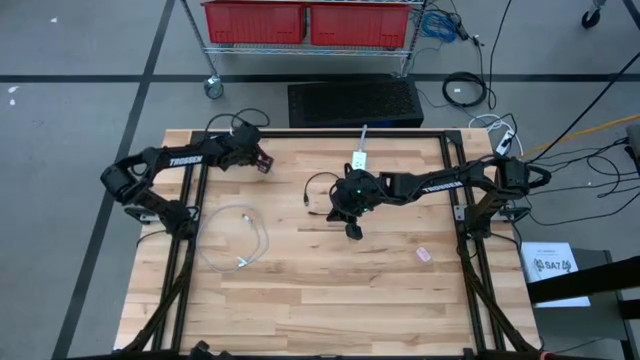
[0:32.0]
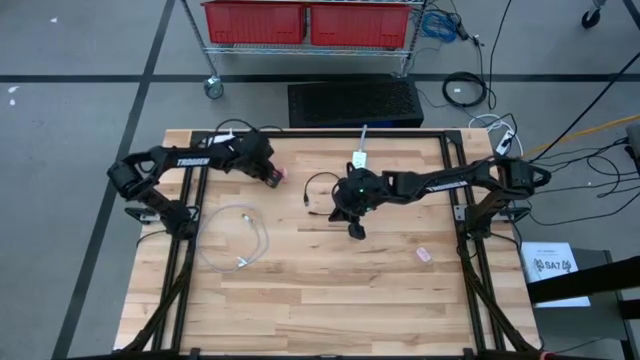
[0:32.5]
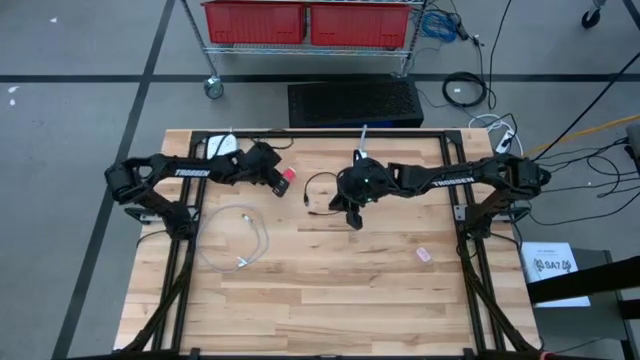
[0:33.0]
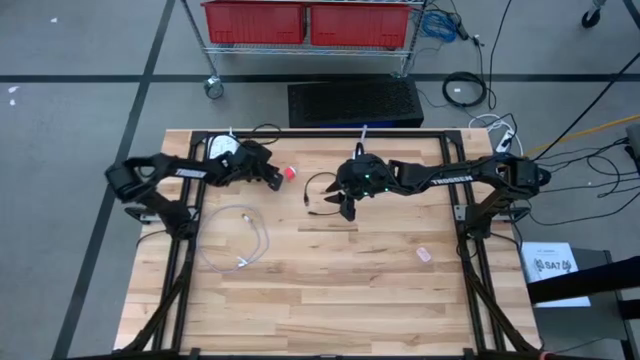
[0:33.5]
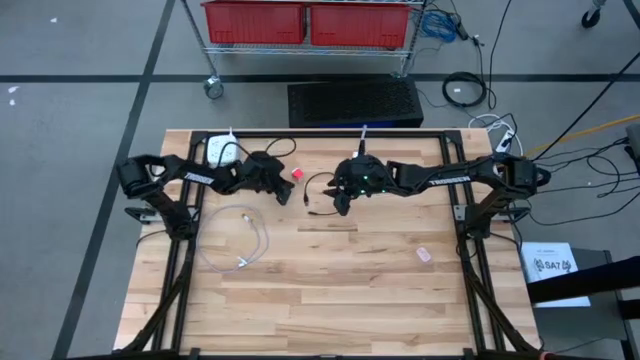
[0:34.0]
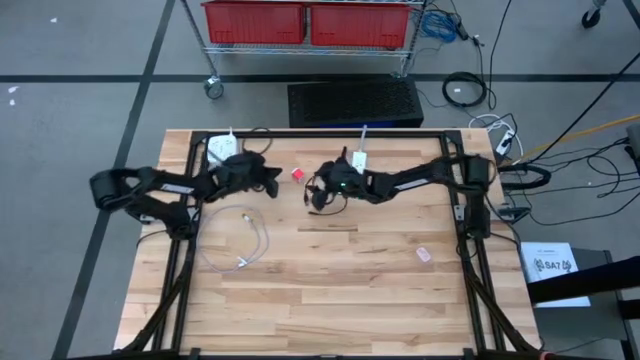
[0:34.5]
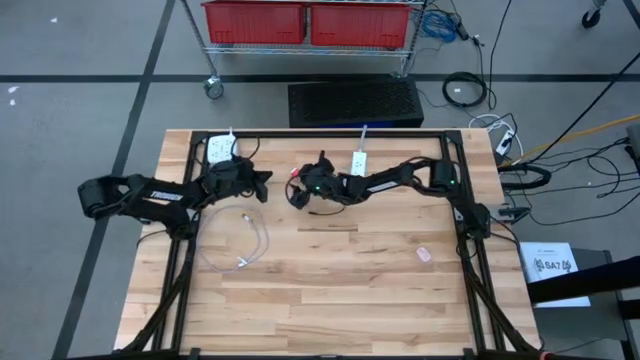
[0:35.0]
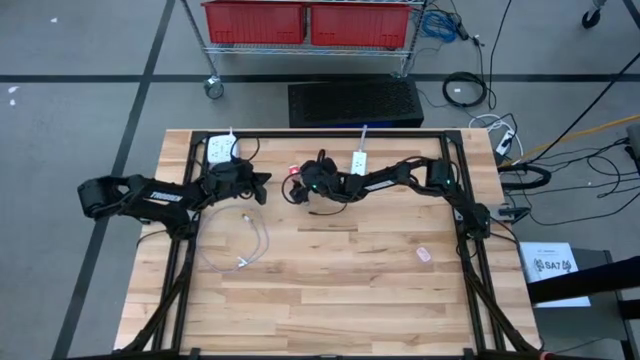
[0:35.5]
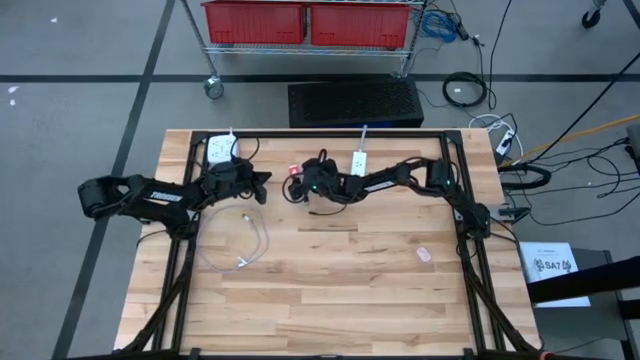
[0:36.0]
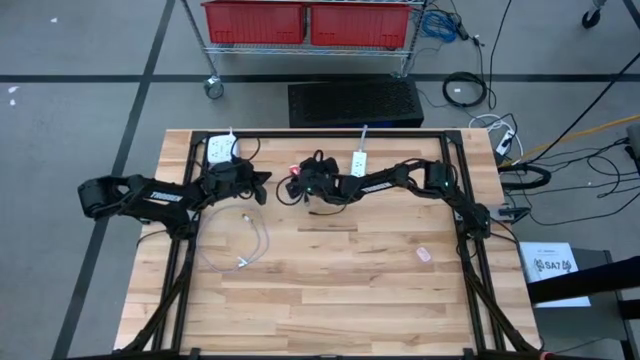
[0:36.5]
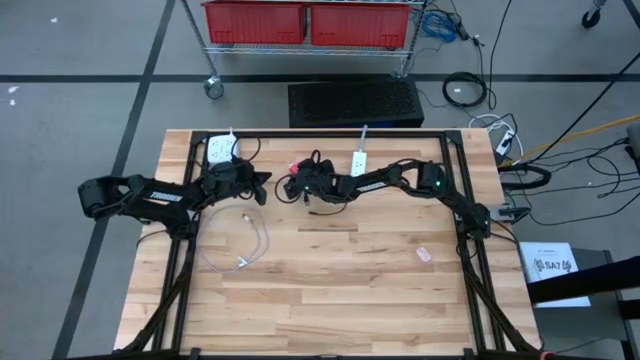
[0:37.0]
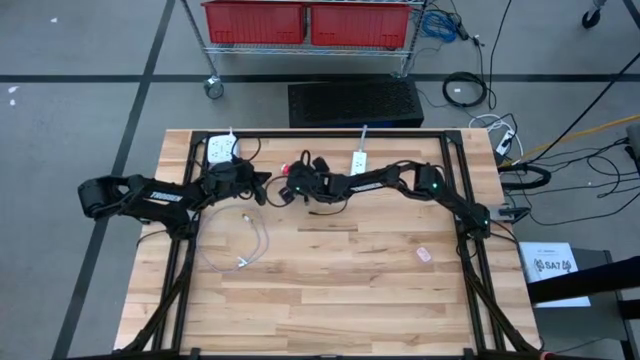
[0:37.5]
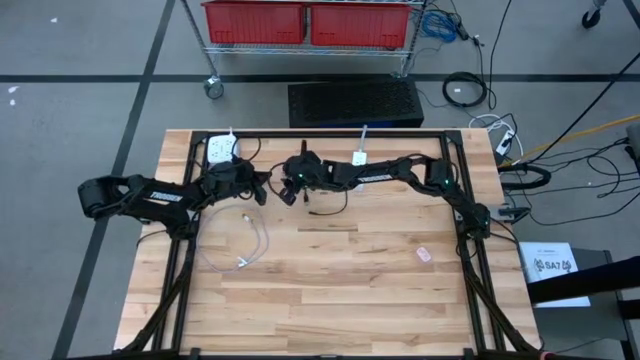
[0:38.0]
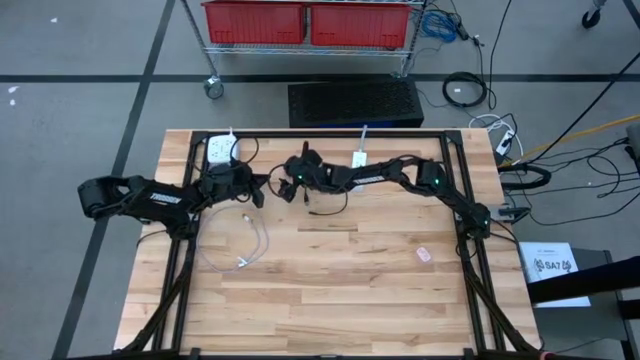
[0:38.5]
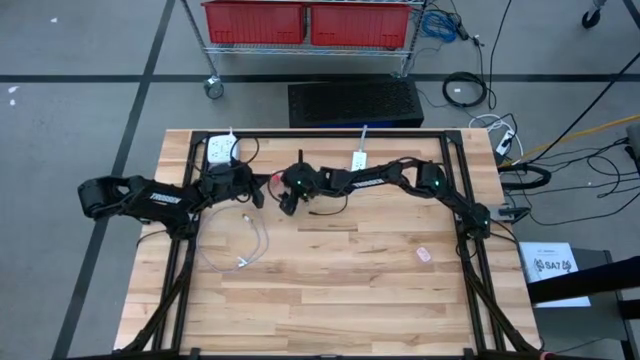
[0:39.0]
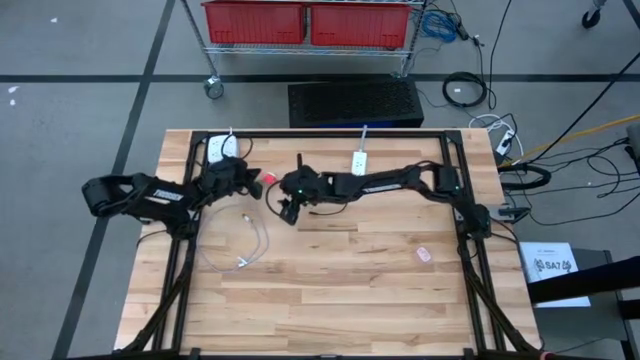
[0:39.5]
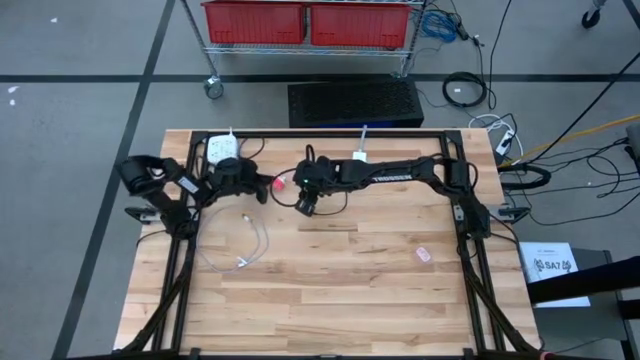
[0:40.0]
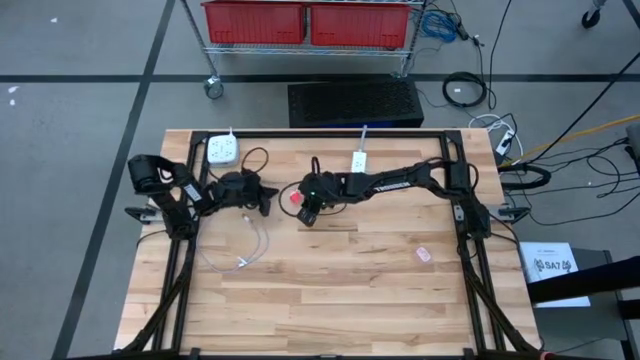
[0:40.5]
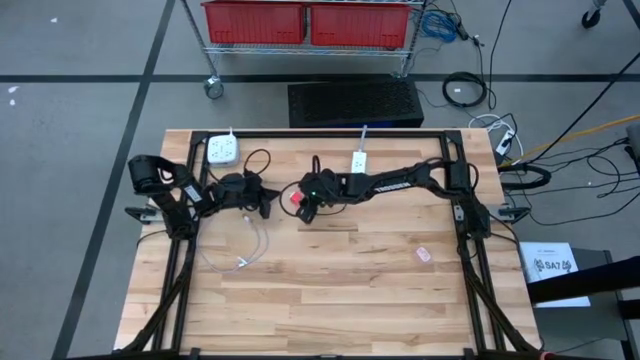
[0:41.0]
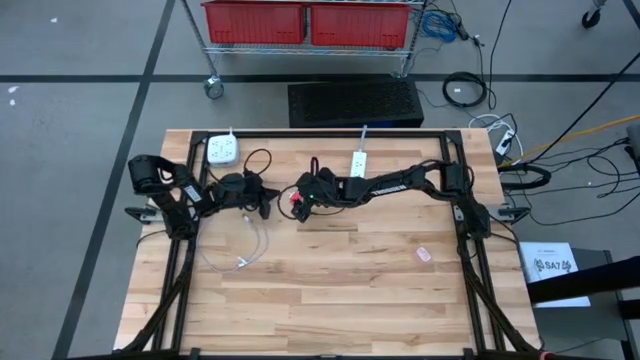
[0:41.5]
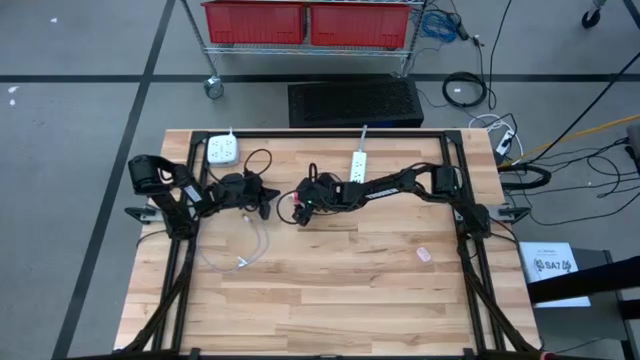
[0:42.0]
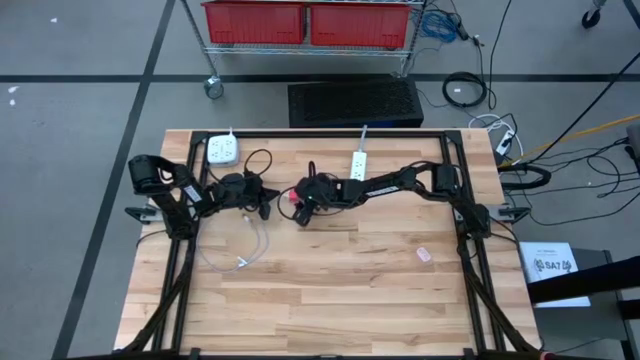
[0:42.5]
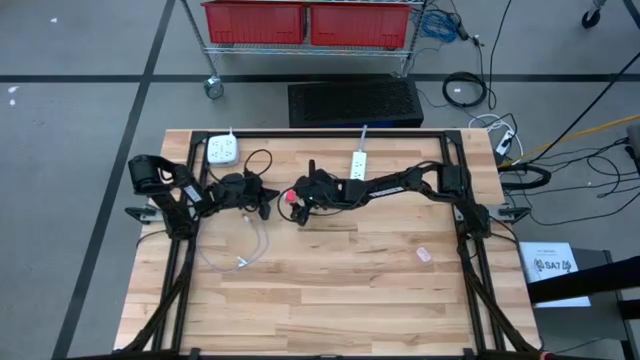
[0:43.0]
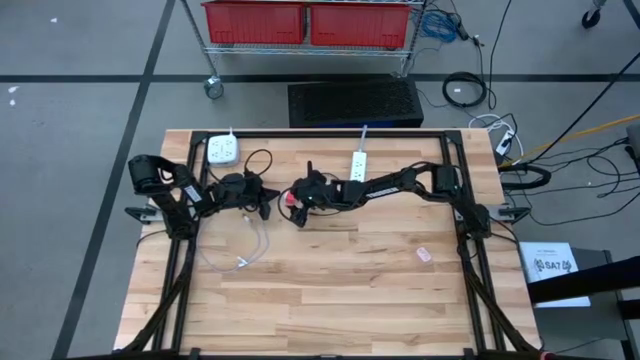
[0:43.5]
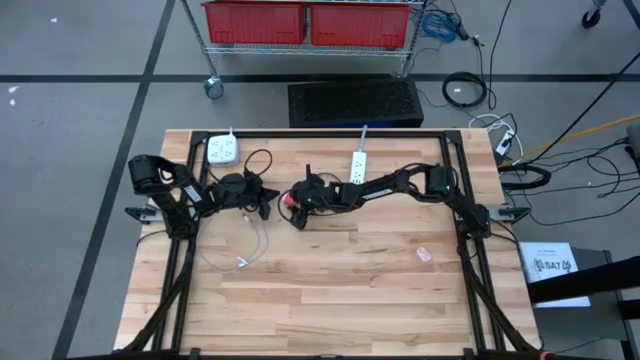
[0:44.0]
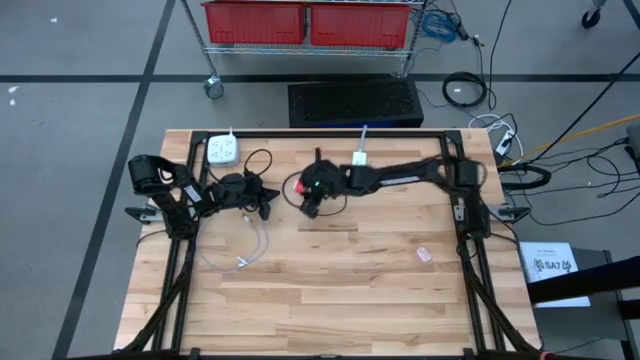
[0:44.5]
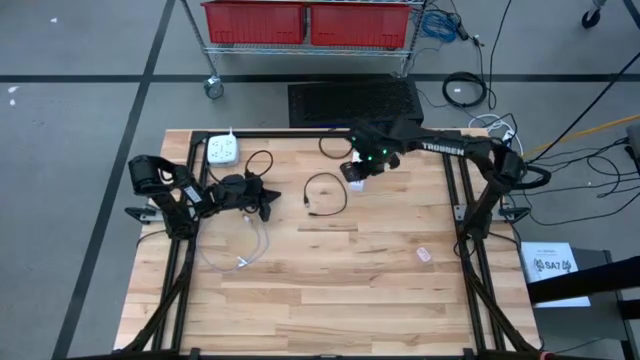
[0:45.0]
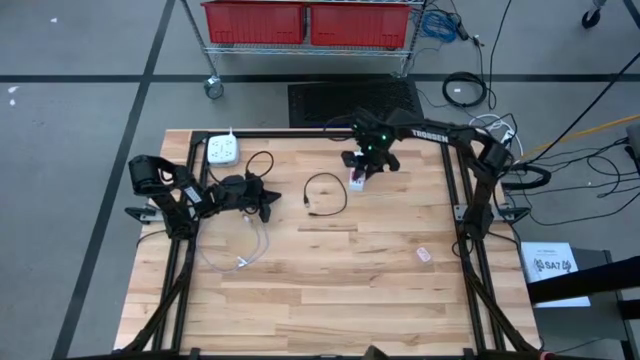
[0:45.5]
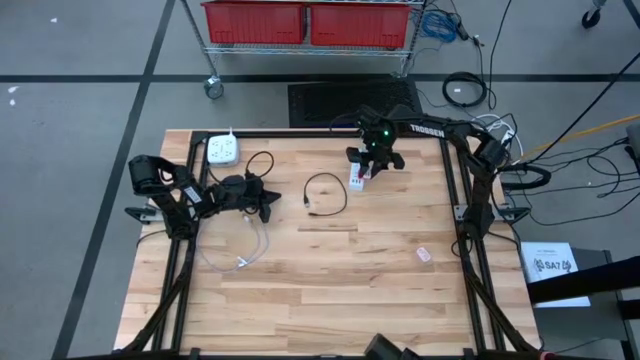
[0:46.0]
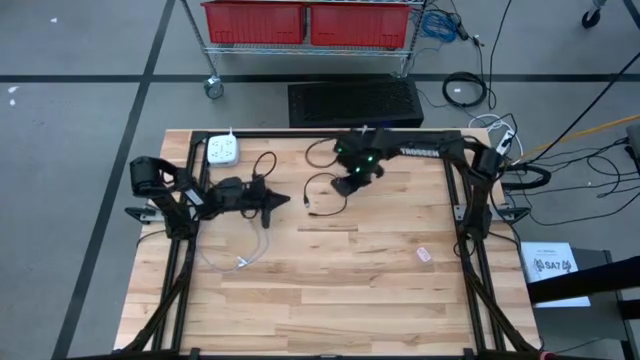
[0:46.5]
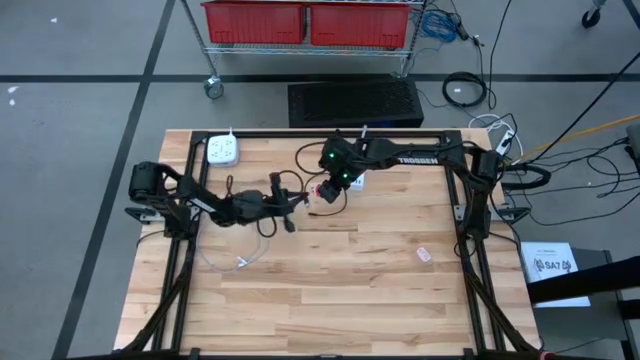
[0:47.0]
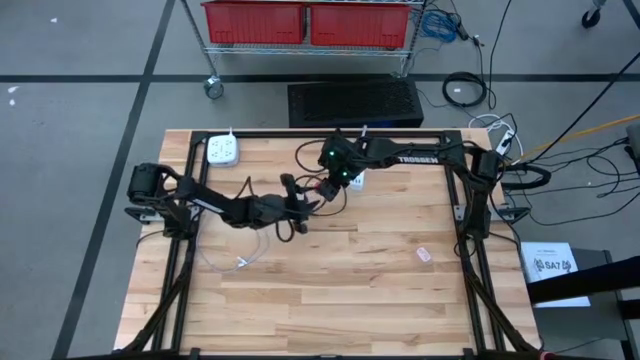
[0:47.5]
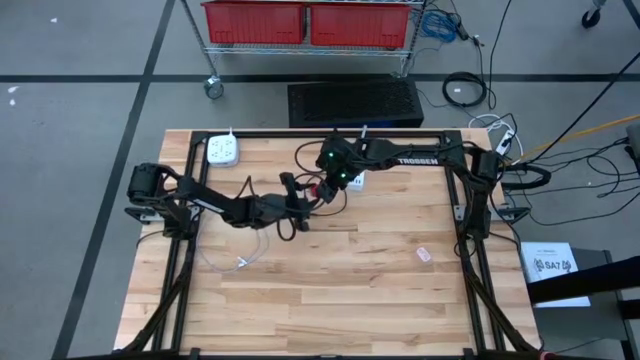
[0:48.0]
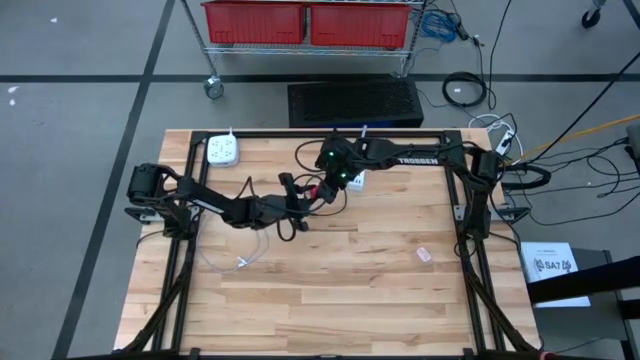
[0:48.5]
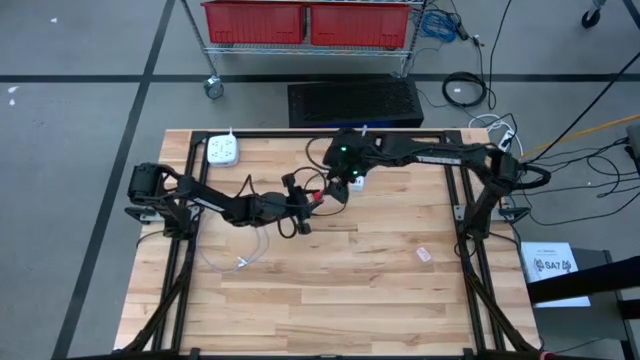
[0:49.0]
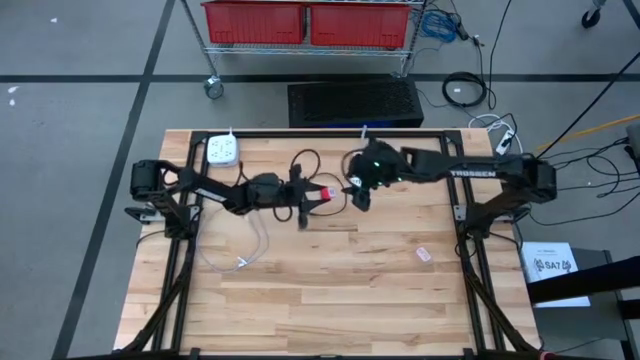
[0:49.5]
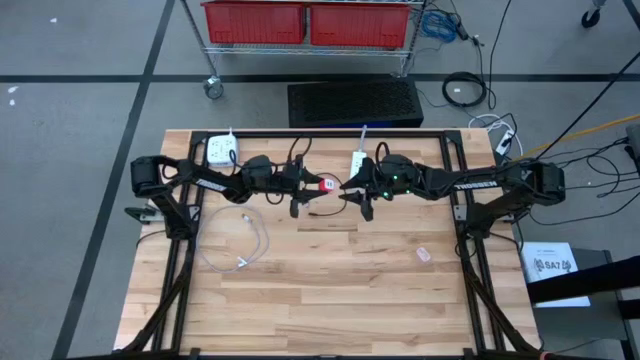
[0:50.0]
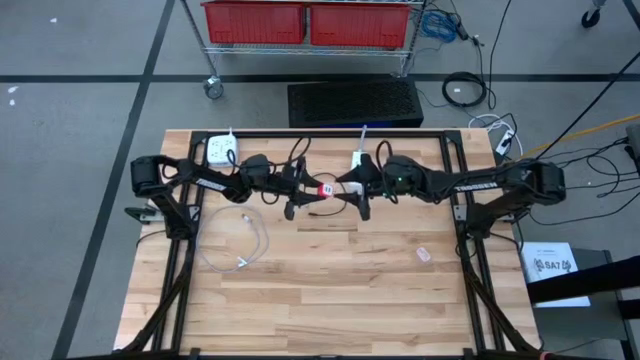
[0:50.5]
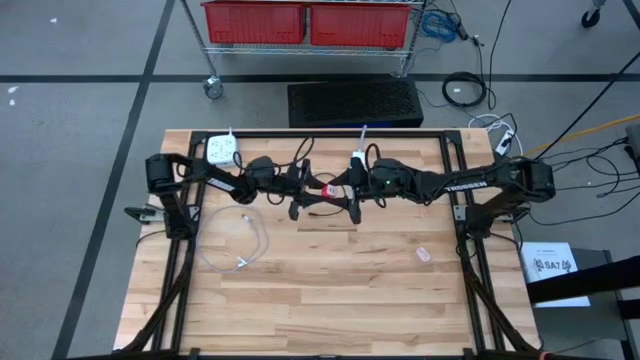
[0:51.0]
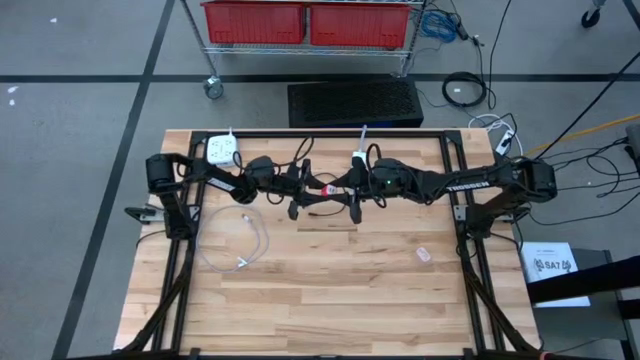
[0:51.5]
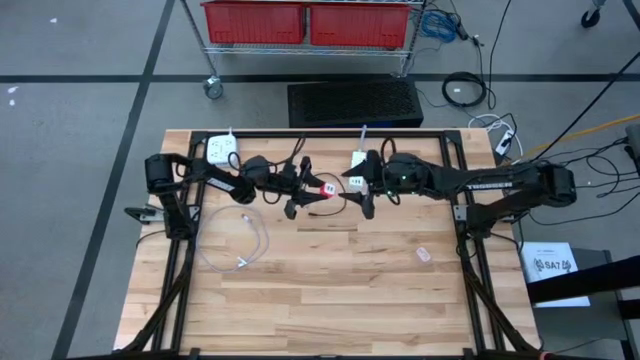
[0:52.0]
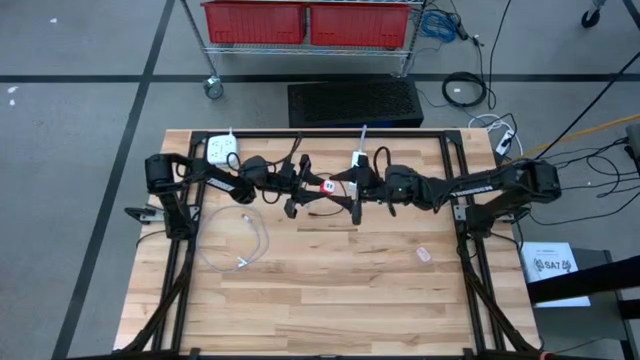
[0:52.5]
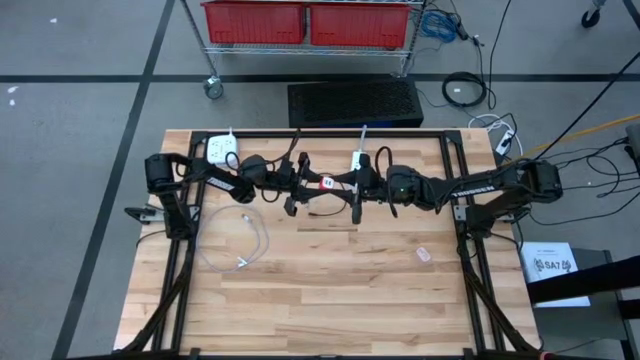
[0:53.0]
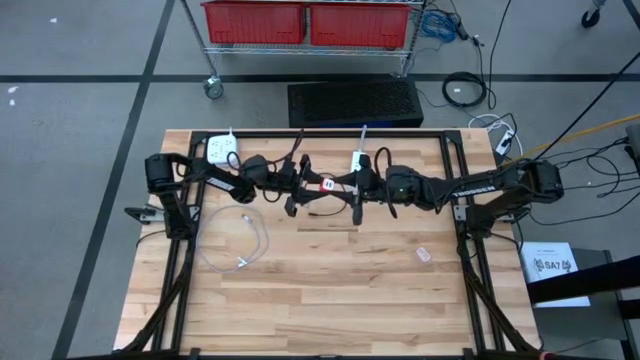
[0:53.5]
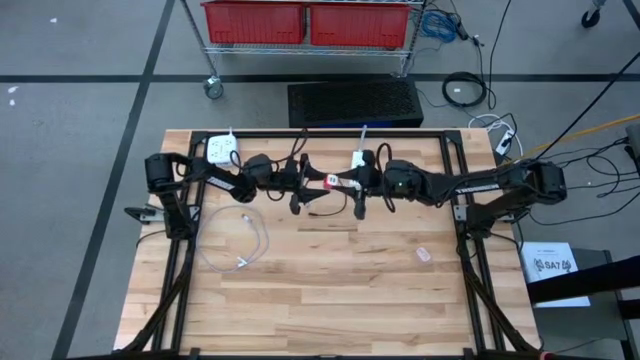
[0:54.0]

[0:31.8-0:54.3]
Task: Insert USB
Insert the red charger adapter into the right outlet extension
